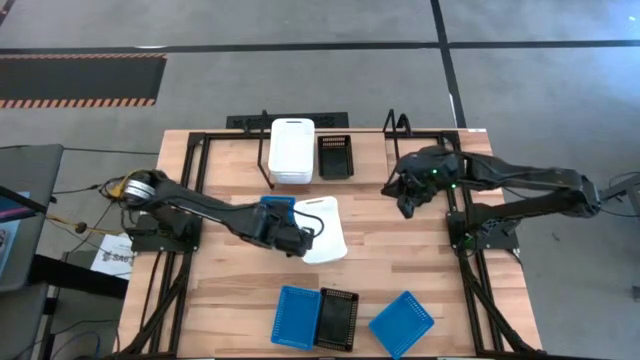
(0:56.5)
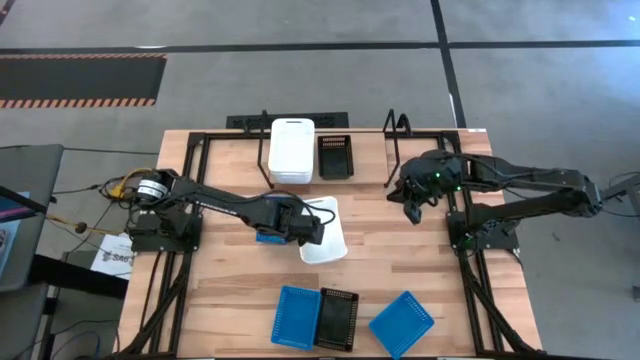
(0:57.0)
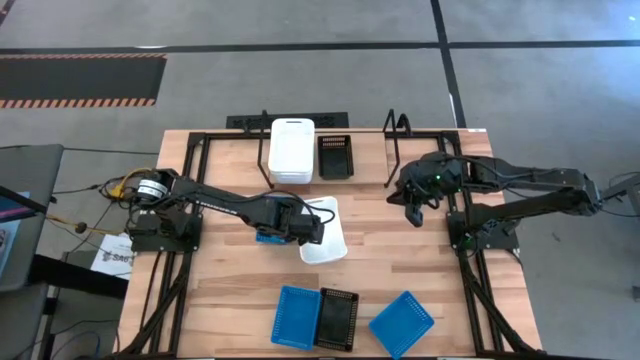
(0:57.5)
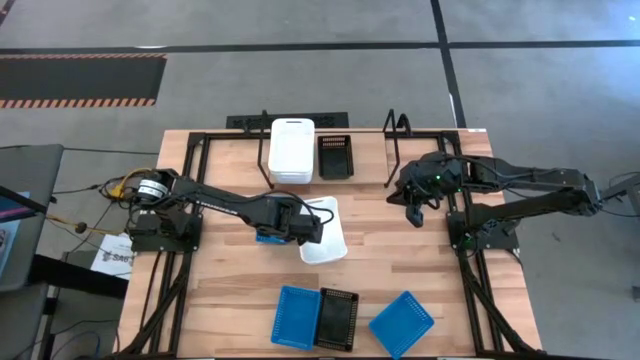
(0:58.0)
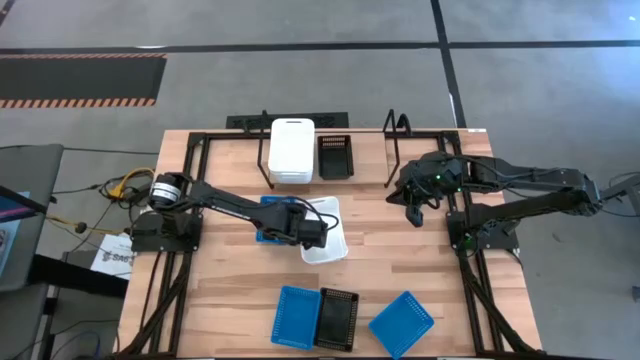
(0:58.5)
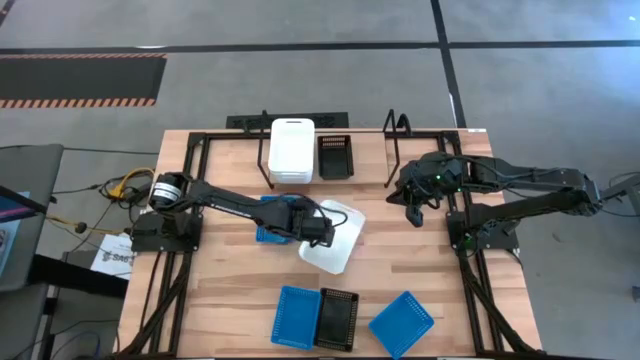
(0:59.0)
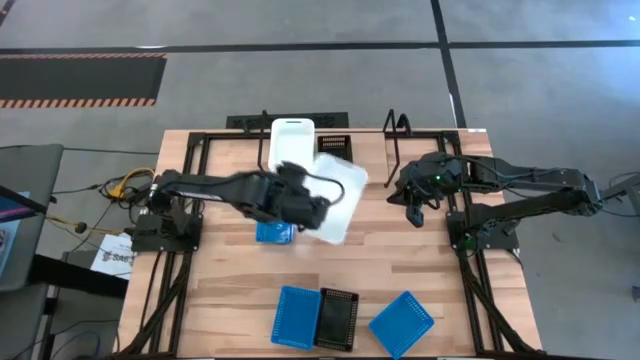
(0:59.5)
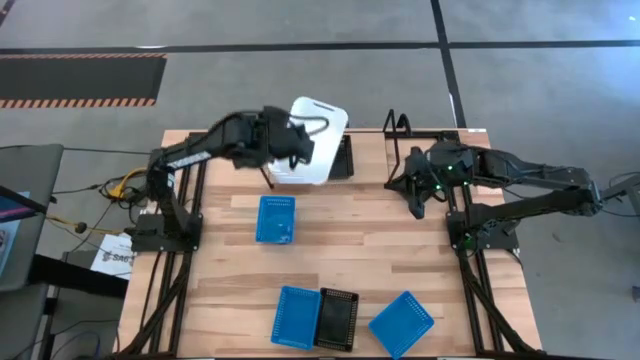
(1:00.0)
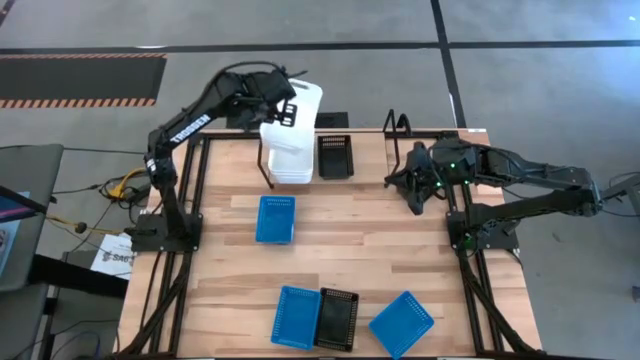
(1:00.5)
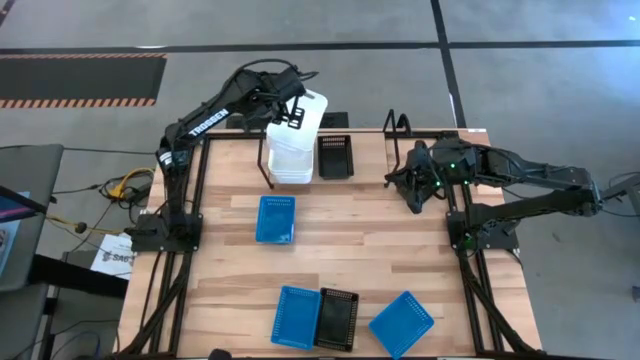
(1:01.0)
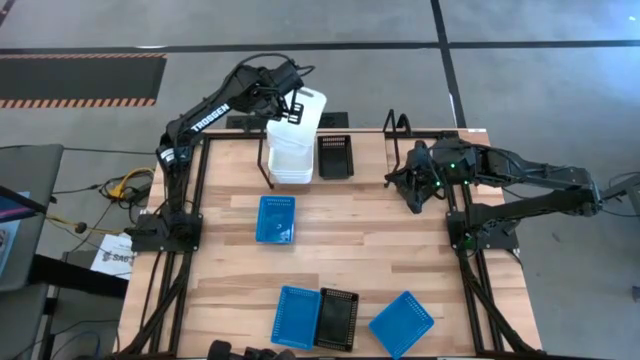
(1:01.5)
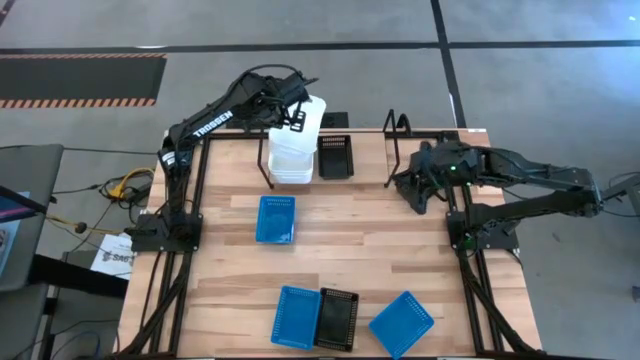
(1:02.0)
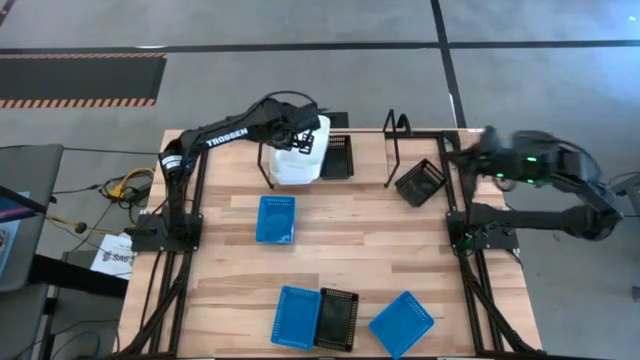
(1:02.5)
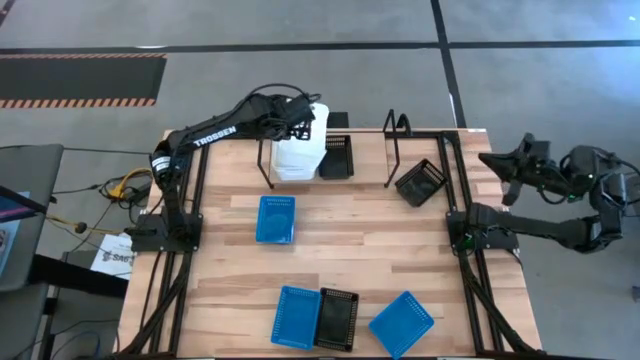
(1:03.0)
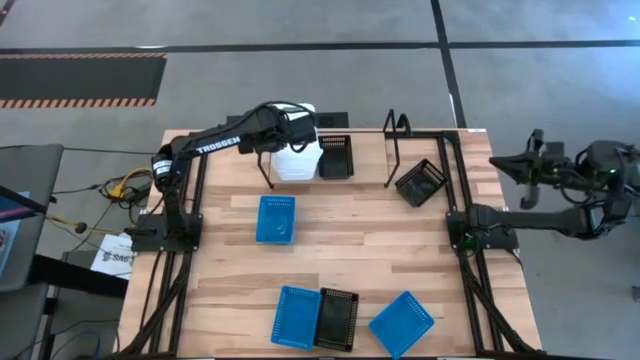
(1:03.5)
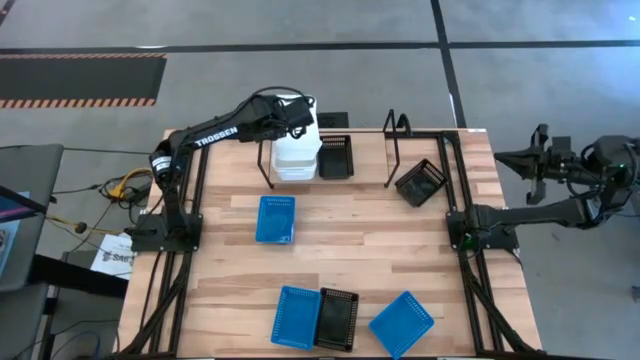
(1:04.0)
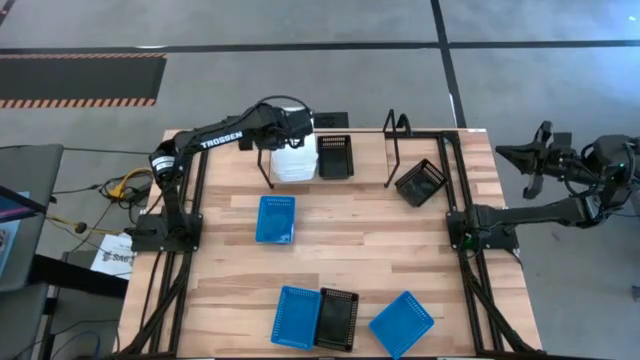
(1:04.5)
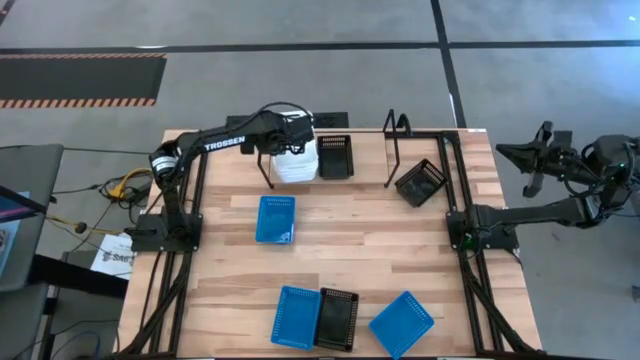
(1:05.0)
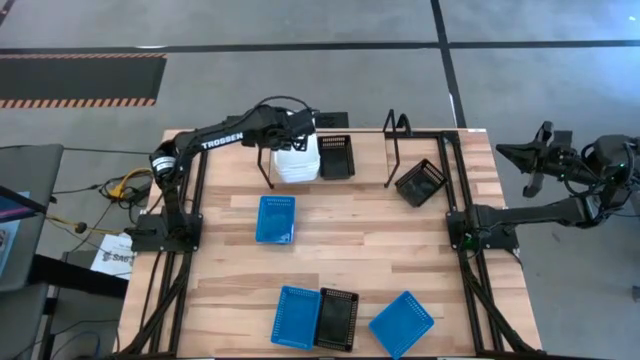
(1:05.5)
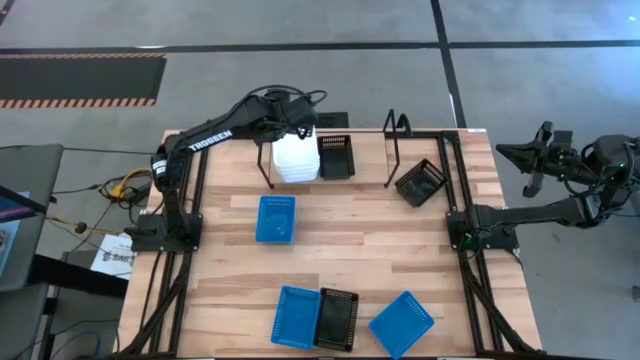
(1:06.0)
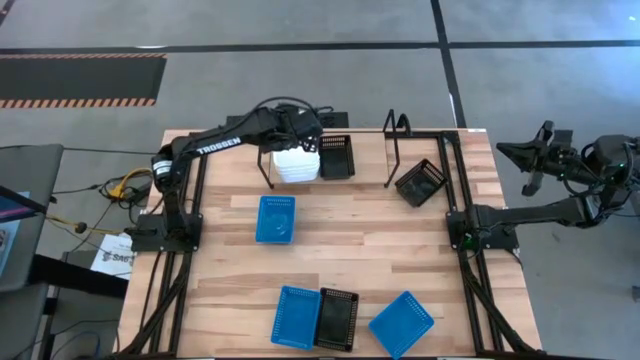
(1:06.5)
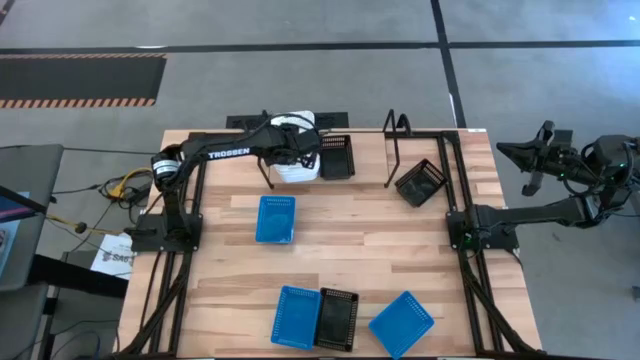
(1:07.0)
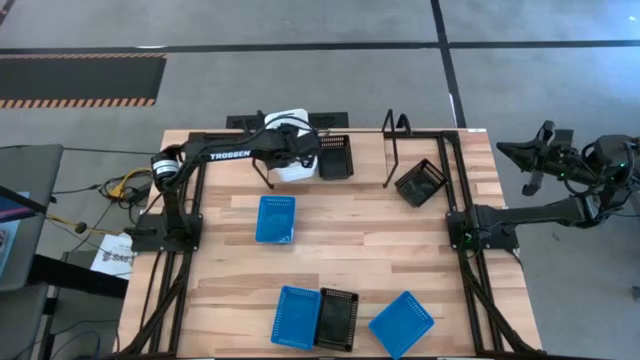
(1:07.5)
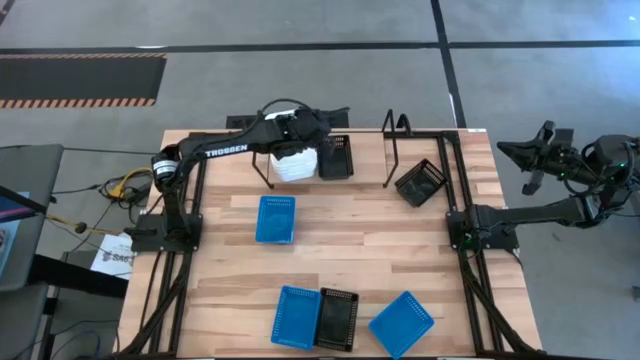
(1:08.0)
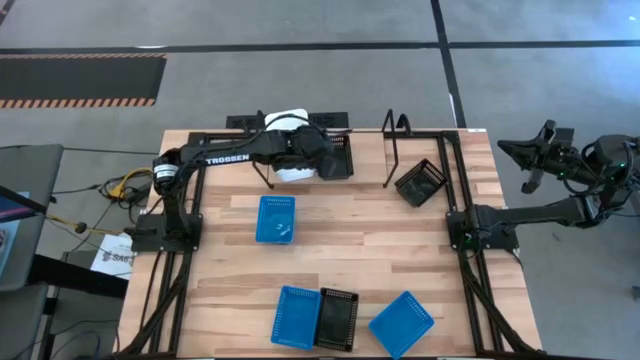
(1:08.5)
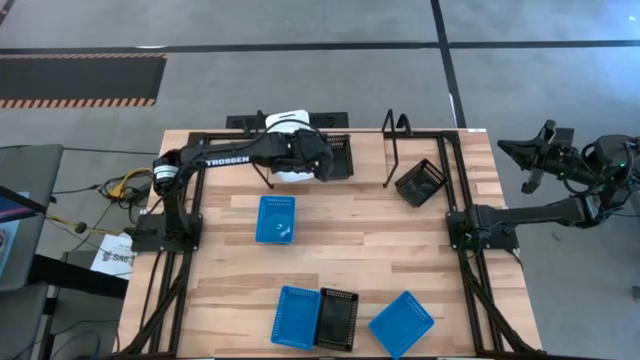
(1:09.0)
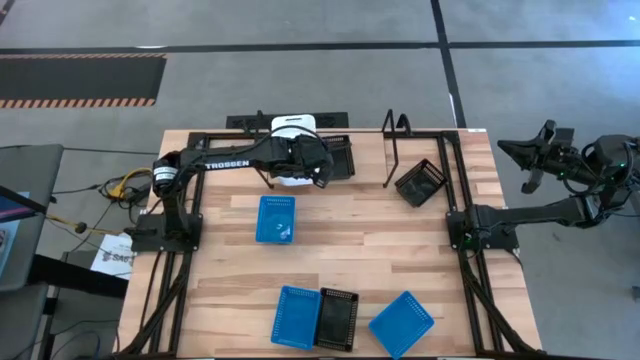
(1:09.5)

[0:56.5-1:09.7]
Task: Stack baskets on shelf by color
Stack the white bin on top of the white bin on the shelf

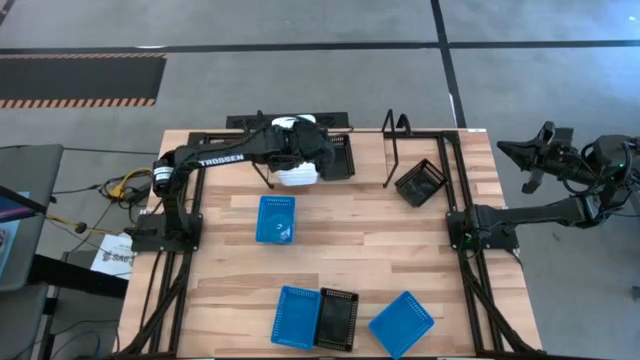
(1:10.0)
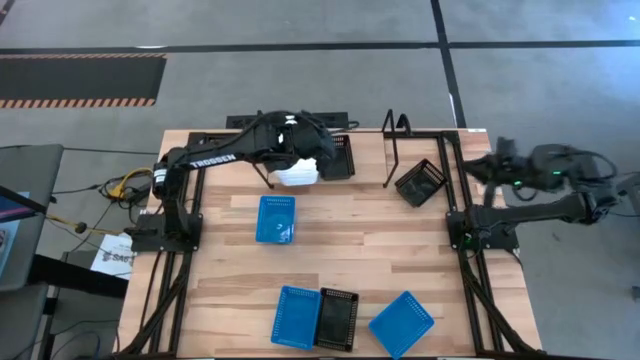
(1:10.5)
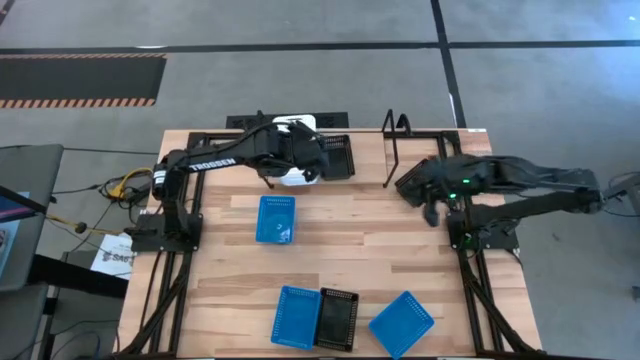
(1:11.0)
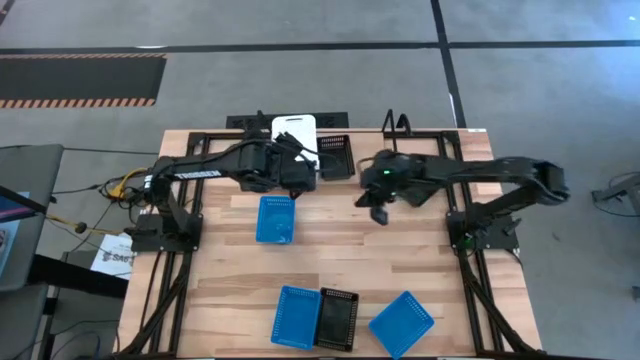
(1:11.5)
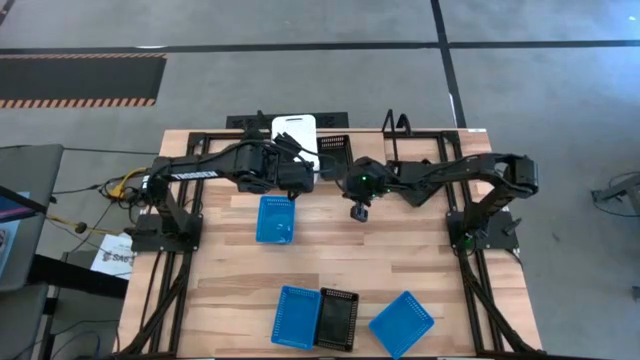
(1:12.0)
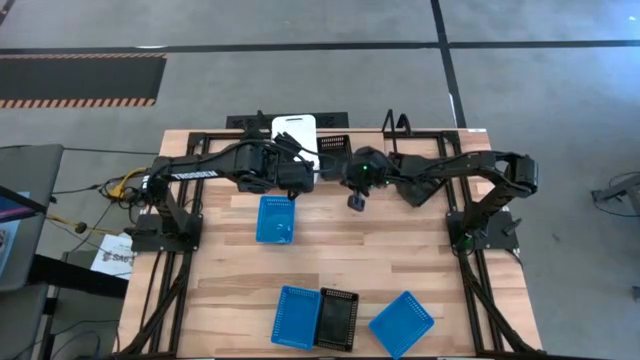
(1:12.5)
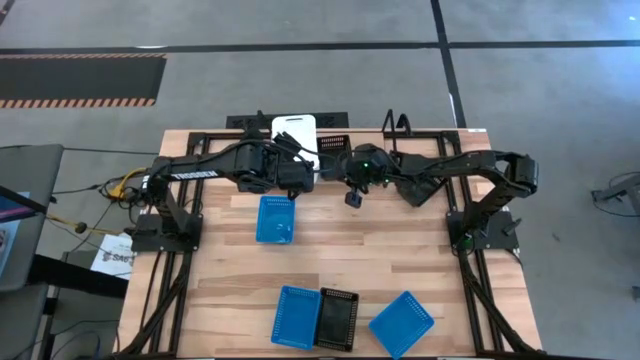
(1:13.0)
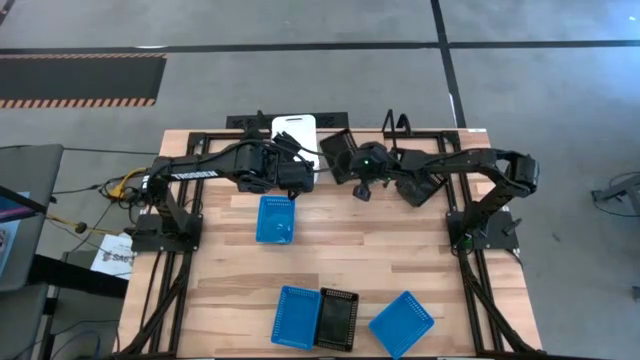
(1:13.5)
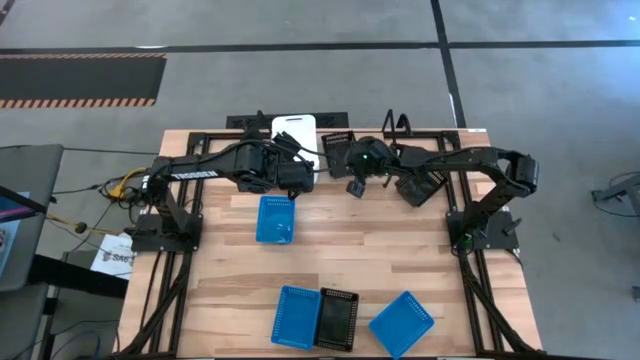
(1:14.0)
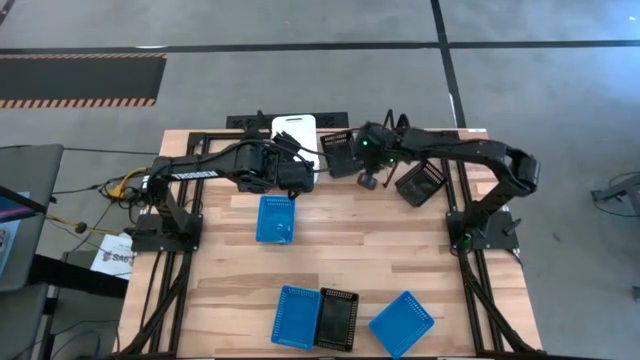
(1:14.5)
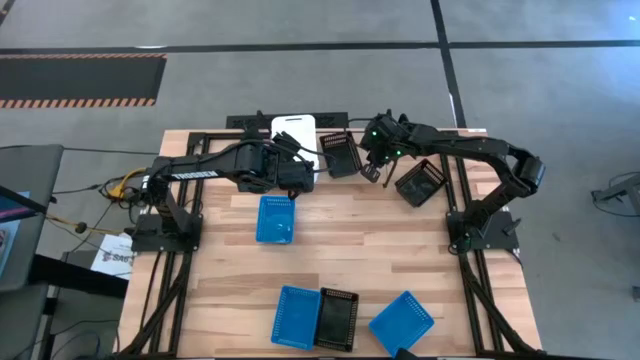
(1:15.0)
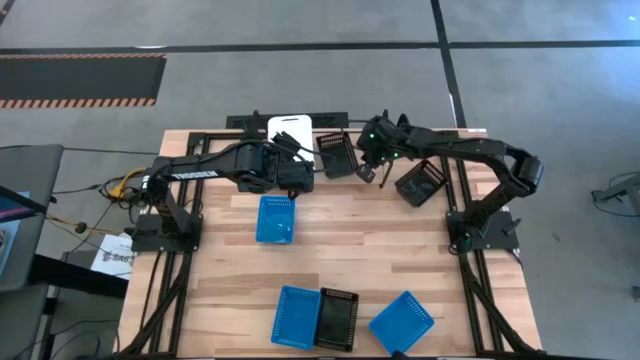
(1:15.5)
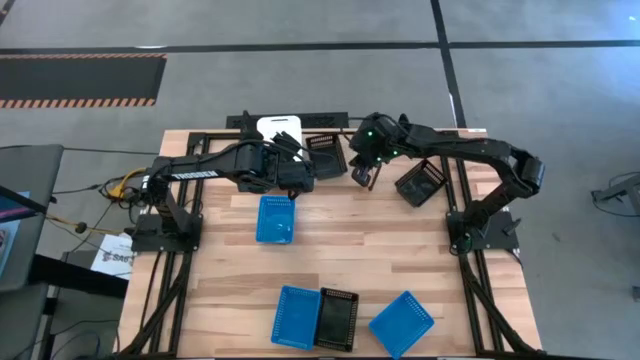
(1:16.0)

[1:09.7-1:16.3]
Adjust the black bin on the shelf

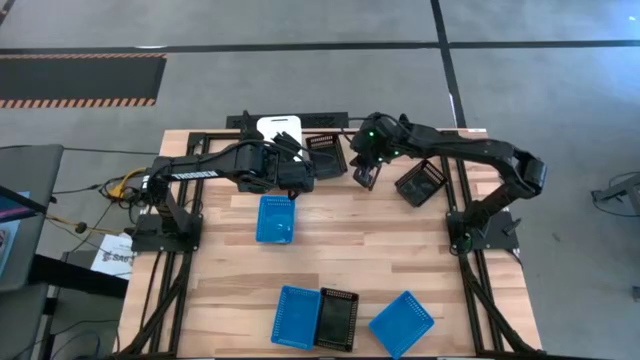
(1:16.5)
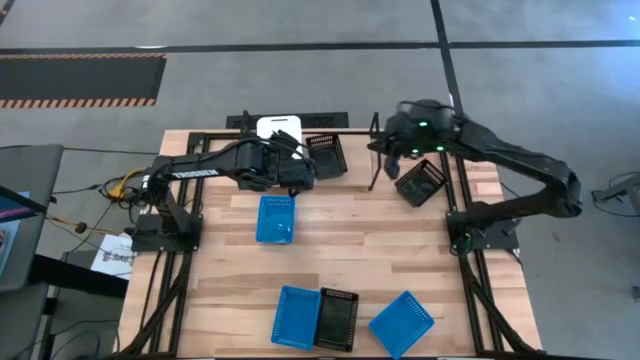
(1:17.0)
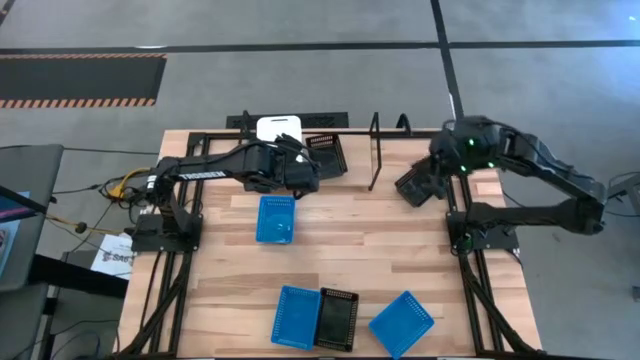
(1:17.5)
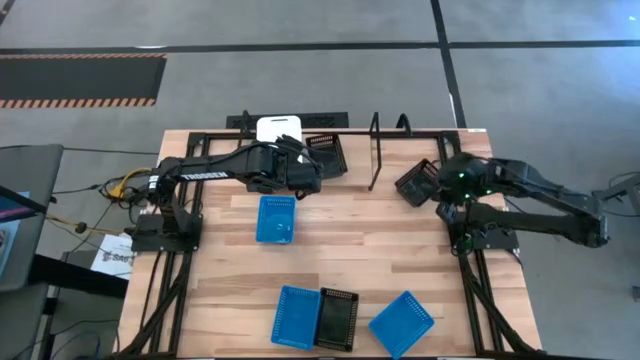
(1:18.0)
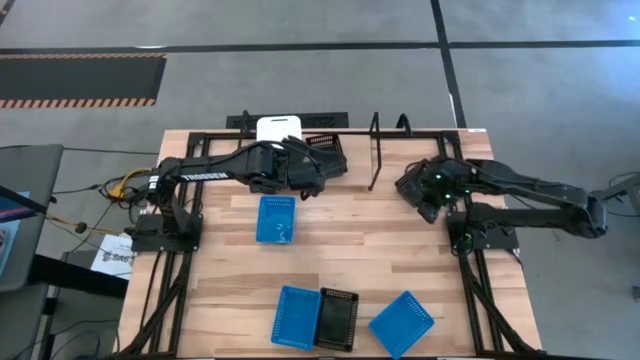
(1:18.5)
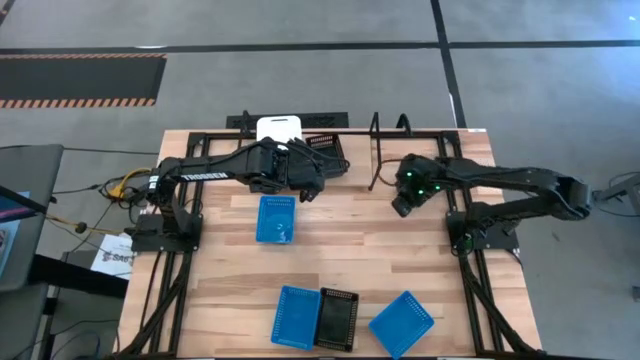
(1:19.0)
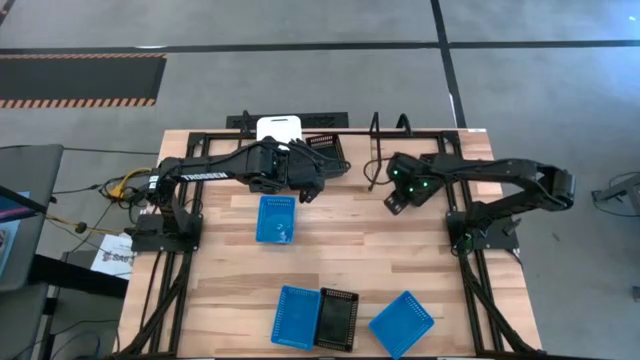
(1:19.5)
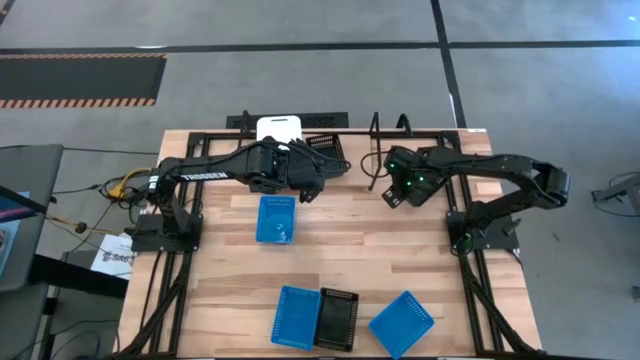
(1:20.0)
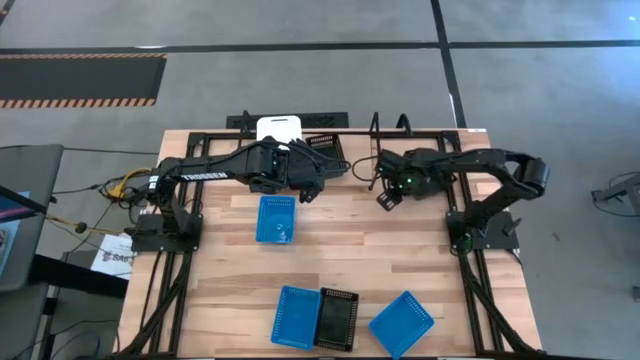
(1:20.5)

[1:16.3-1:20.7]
Stack the top black bin on top of the black bin on the shelf
